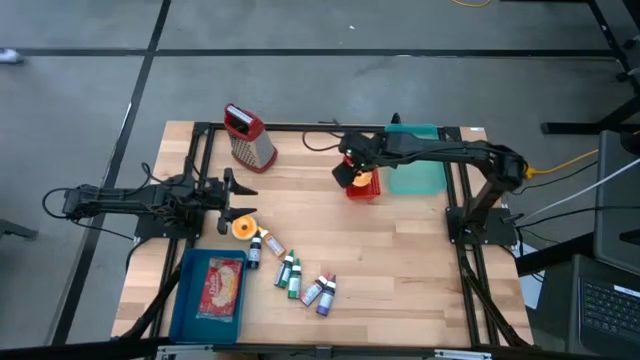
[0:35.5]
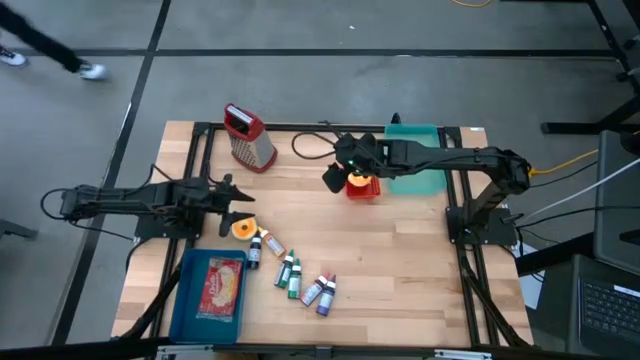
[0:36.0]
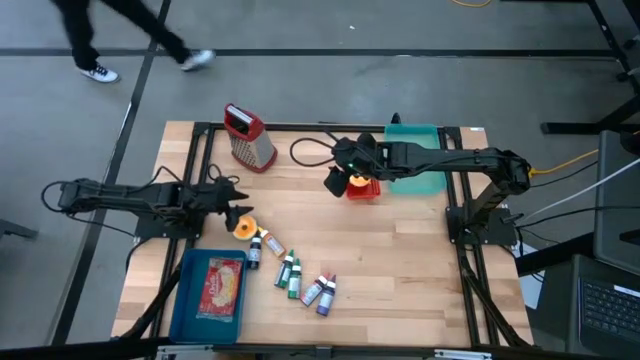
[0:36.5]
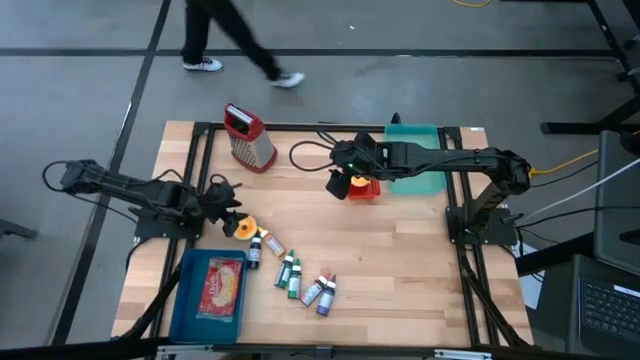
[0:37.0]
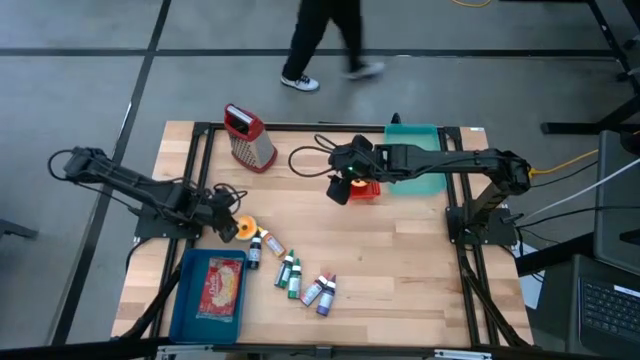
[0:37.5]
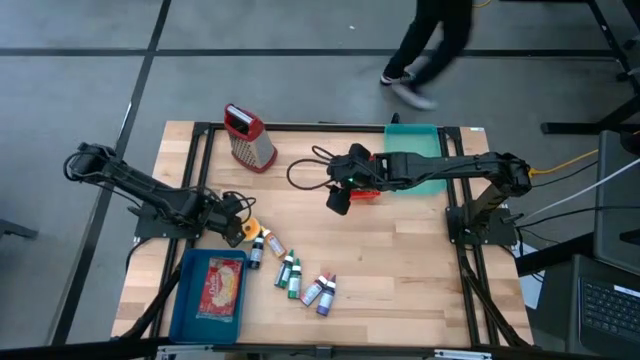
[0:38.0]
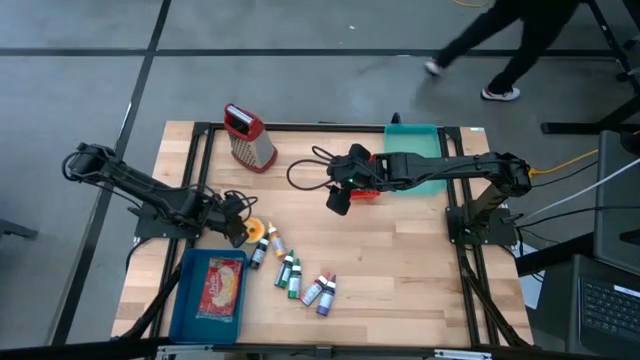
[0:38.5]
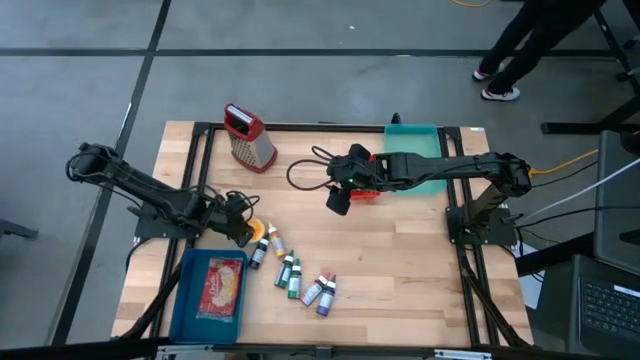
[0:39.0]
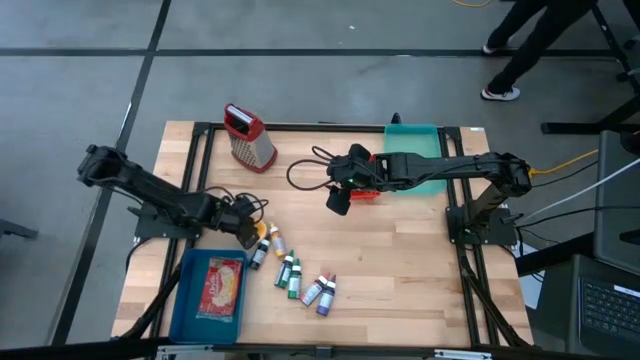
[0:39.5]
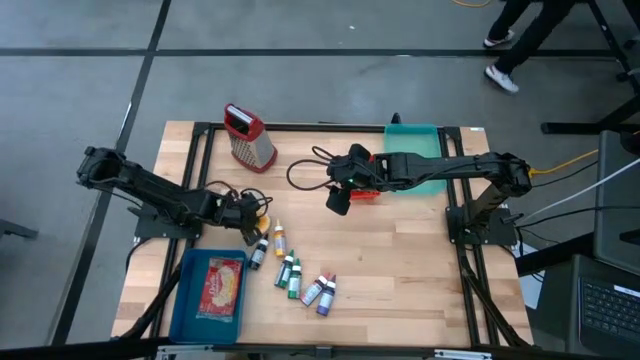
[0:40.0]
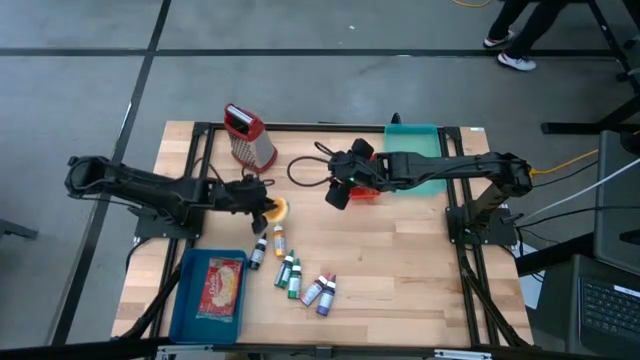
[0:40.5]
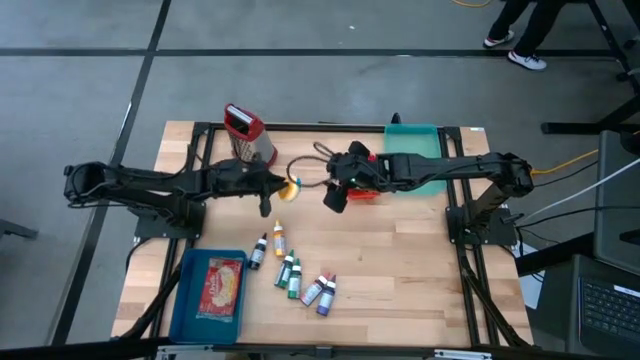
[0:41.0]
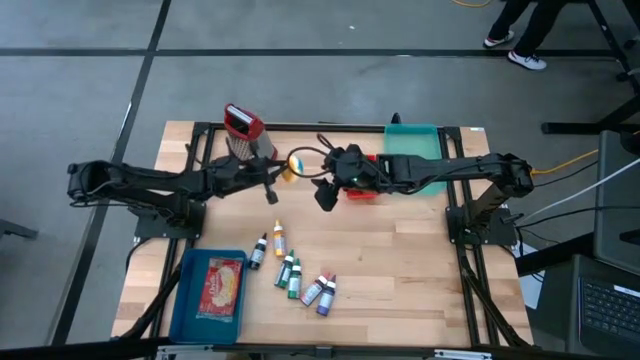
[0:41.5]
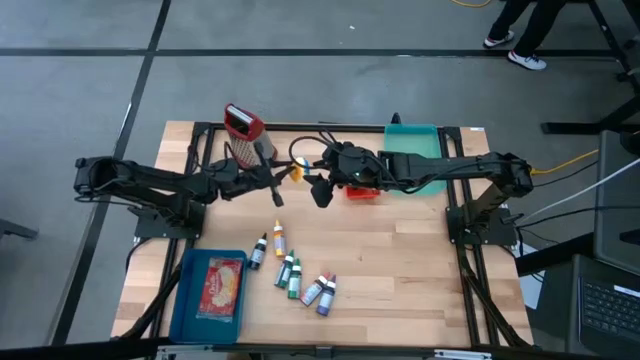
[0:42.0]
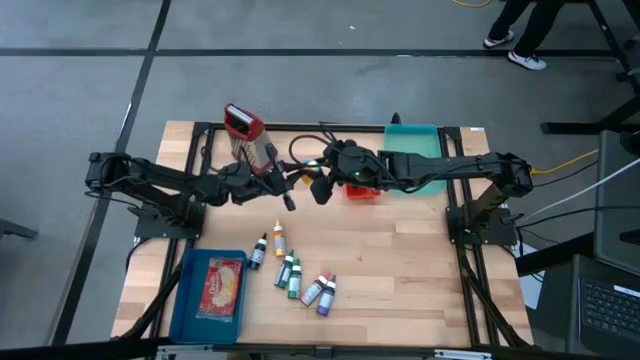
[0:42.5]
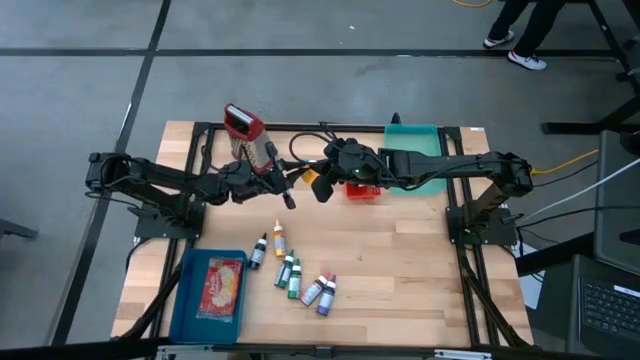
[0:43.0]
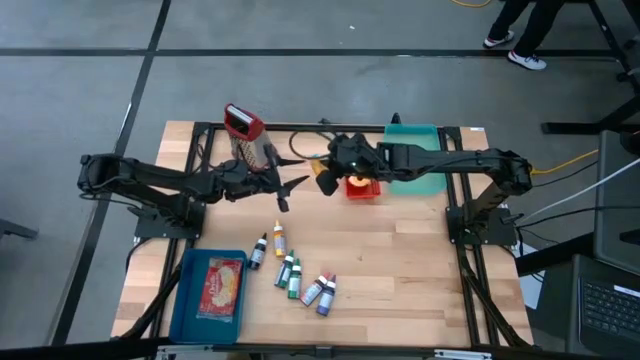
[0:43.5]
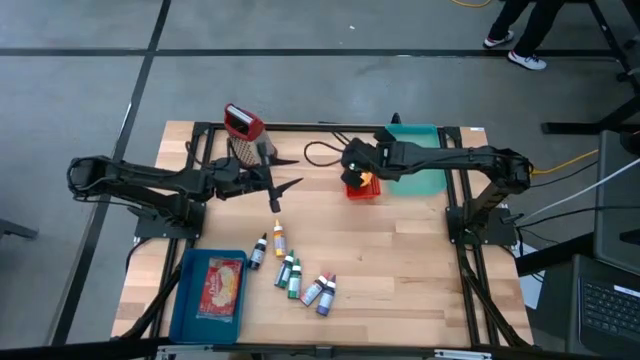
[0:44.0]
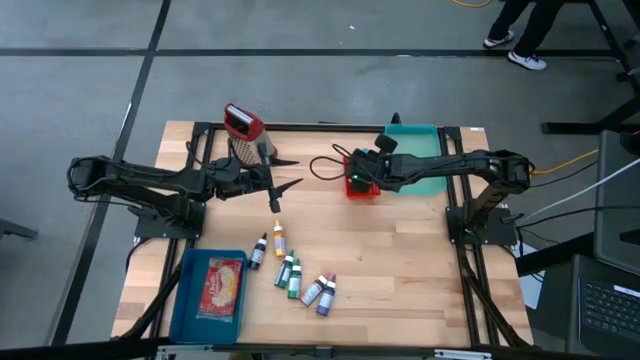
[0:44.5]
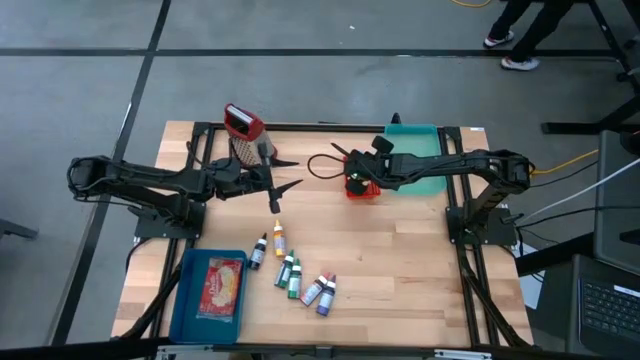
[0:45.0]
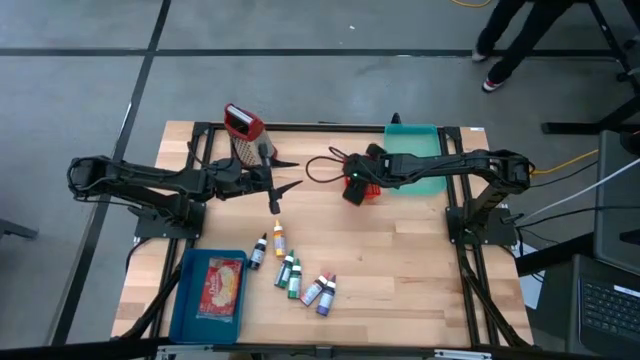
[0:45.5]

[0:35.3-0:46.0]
Put the orange and blue donut into the red bin

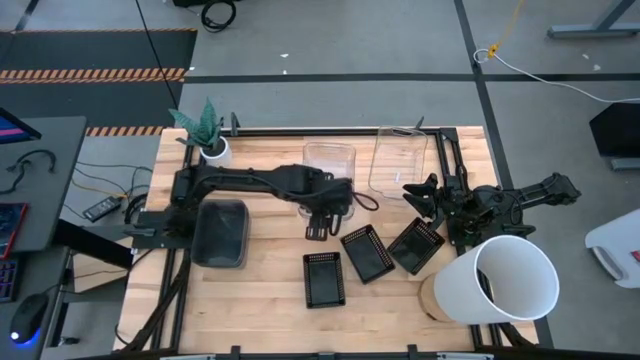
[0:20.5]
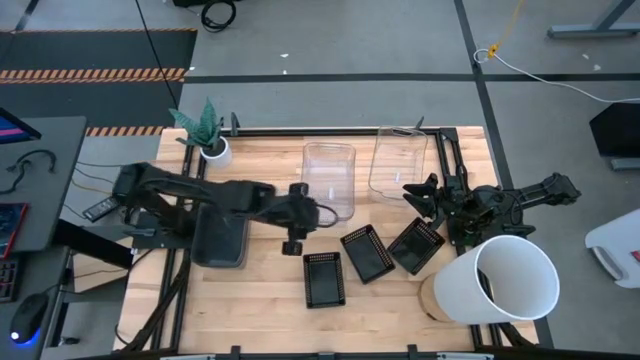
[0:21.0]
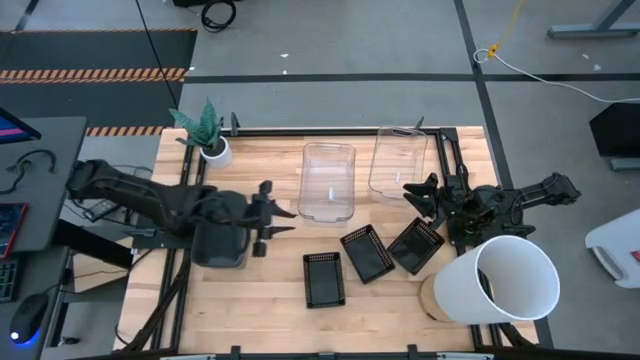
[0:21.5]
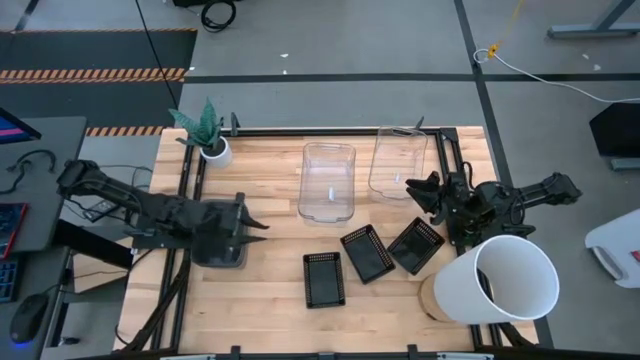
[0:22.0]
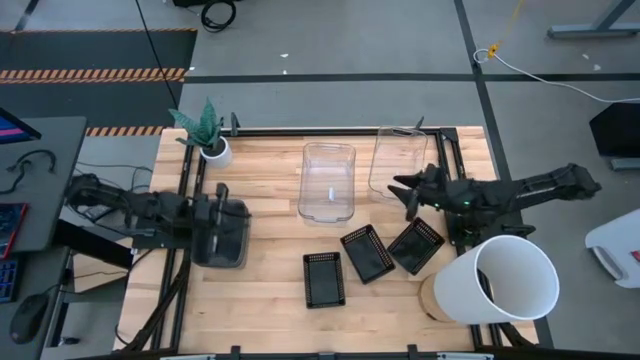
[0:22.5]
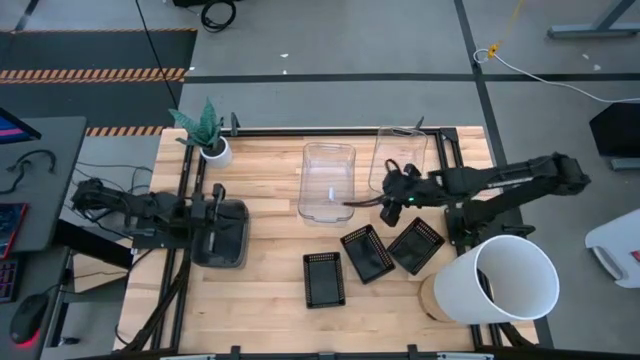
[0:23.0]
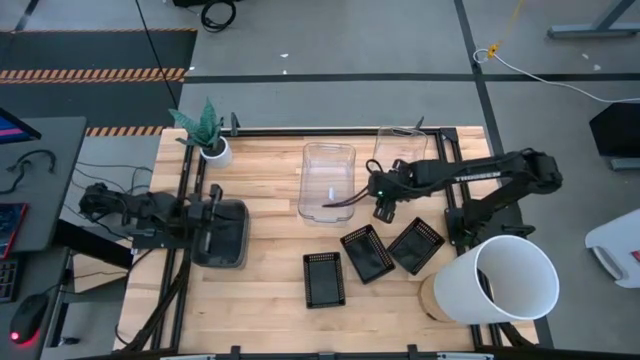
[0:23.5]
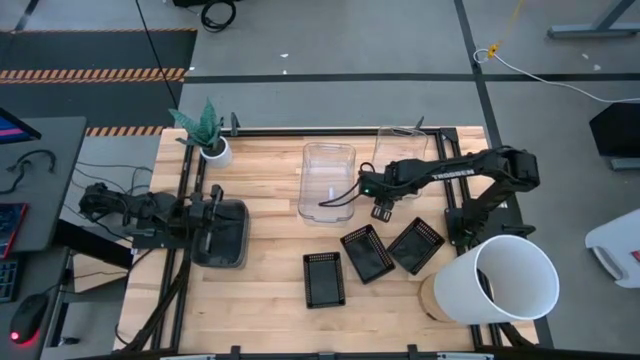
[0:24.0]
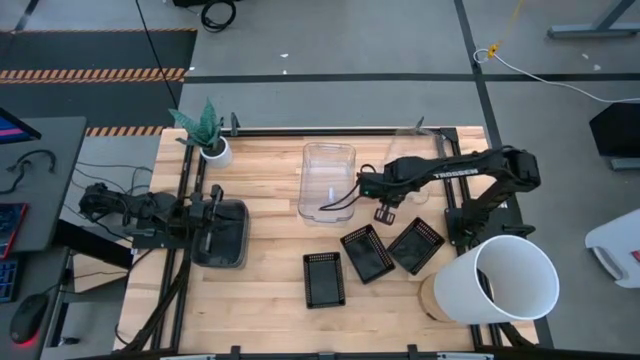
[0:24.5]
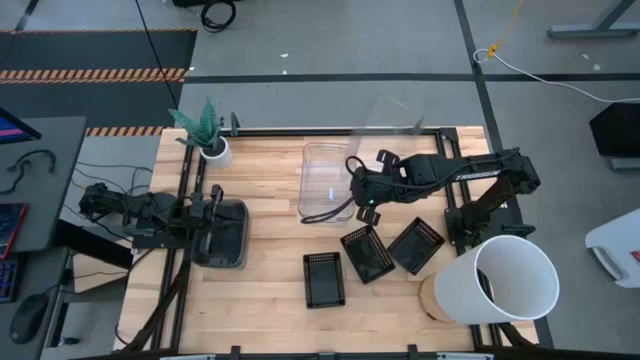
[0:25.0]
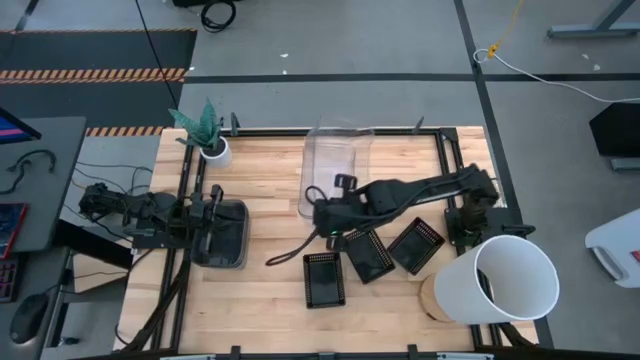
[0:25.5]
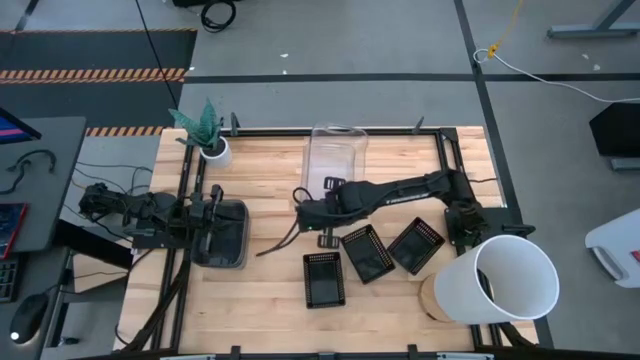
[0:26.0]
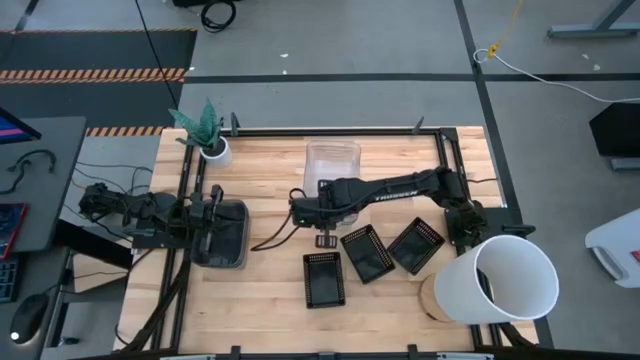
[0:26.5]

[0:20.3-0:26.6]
Stack the right transparent bin on the left stacked transparent bins

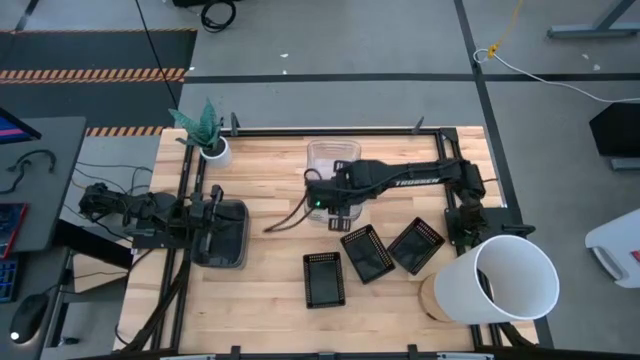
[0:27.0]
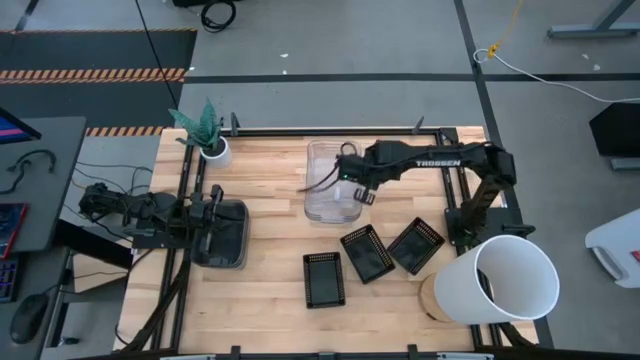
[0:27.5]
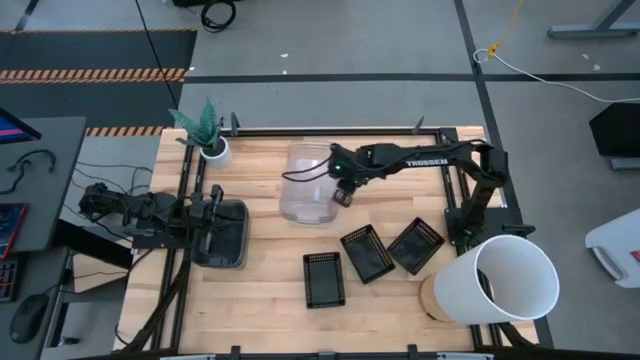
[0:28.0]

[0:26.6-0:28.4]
Adjust the stacked transparent bins

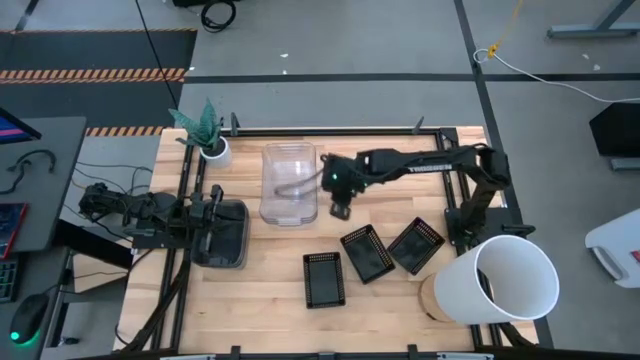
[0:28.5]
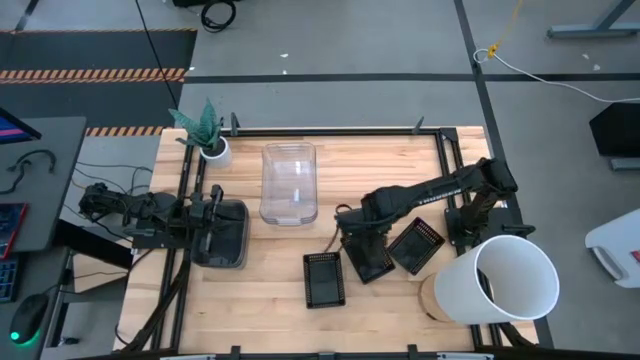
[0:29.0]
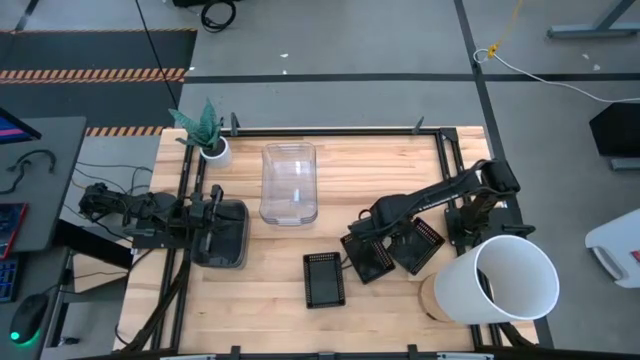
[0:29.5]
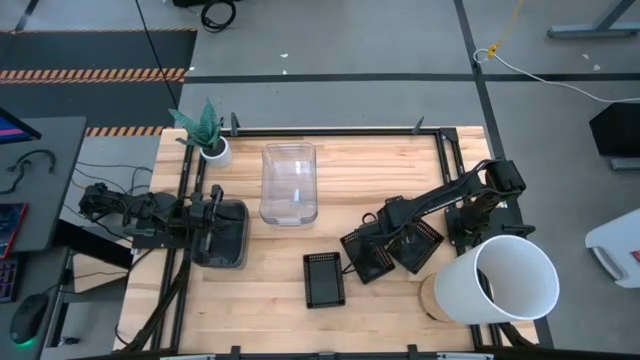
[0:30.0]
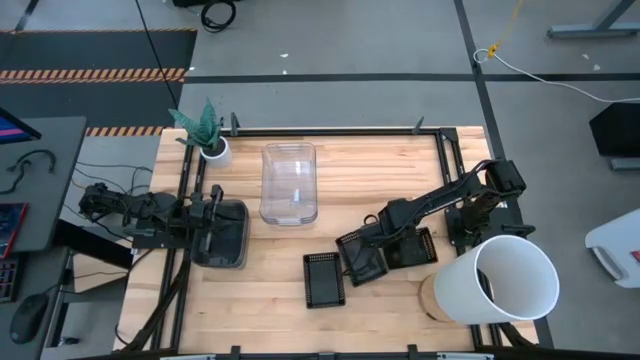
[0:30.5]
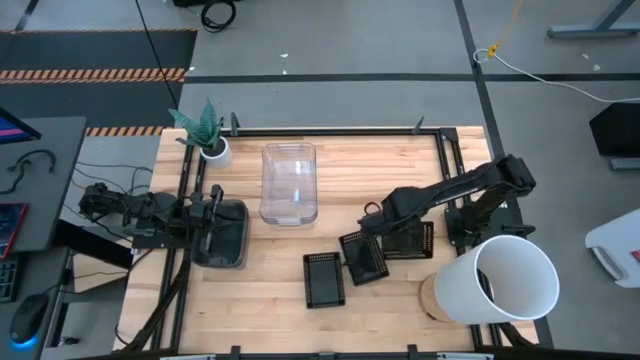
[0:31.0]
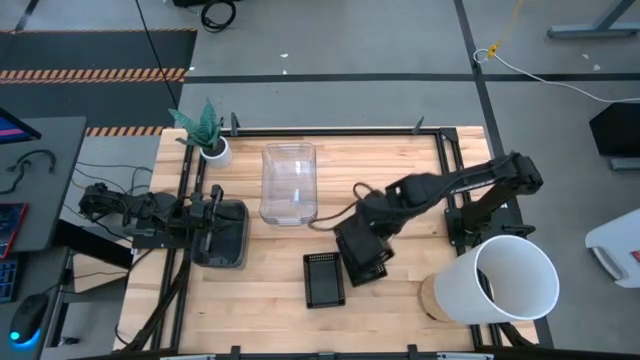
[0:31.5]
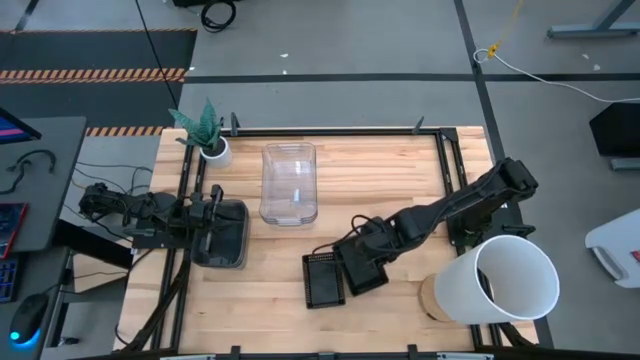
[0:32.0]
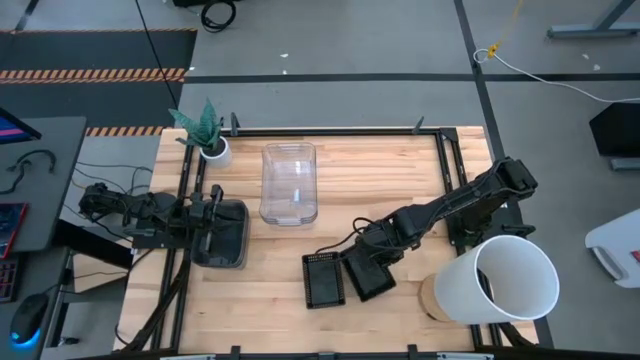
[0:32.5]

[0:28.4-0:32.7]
Stack the right black basket on the center black basket
